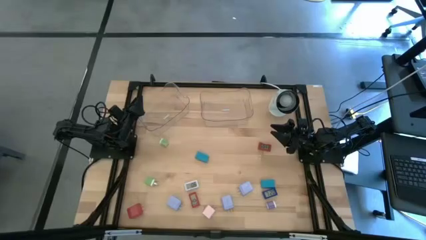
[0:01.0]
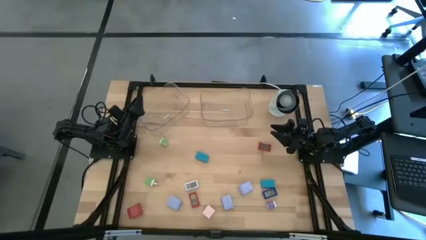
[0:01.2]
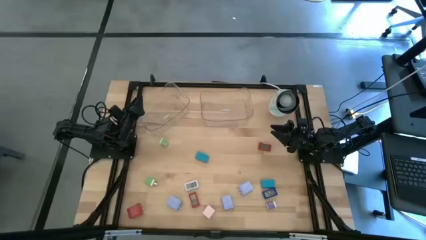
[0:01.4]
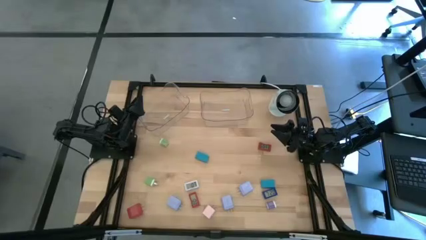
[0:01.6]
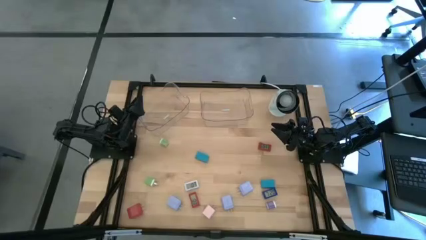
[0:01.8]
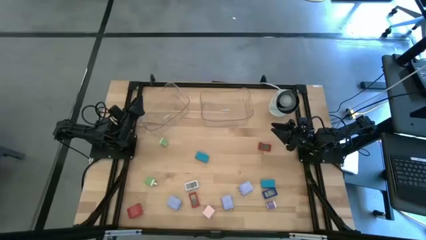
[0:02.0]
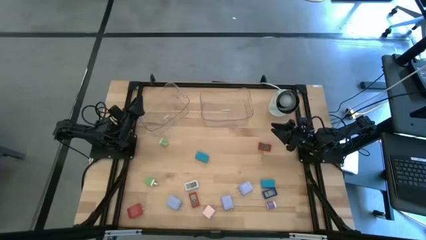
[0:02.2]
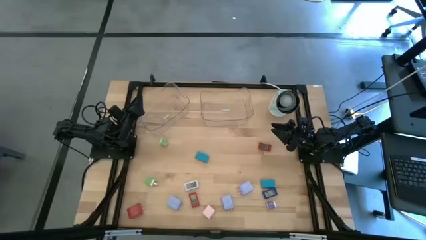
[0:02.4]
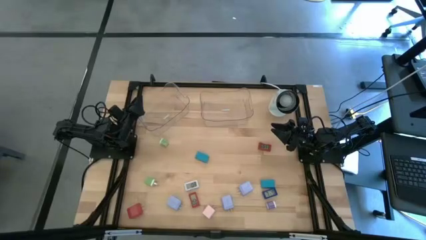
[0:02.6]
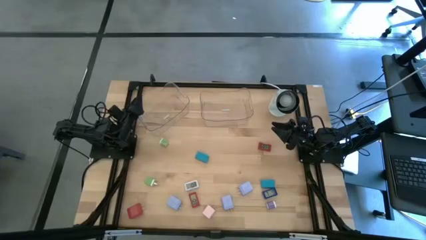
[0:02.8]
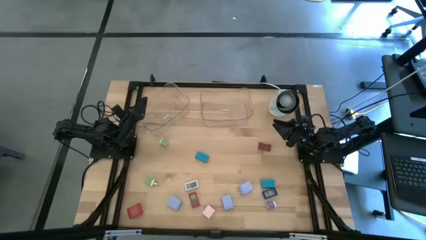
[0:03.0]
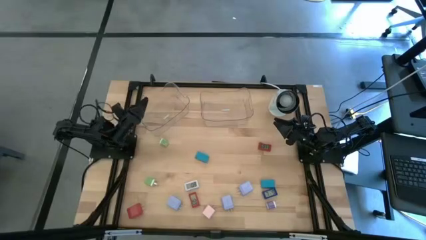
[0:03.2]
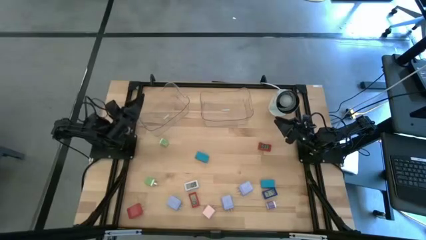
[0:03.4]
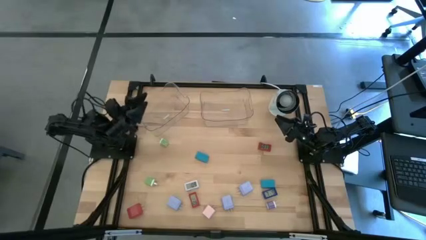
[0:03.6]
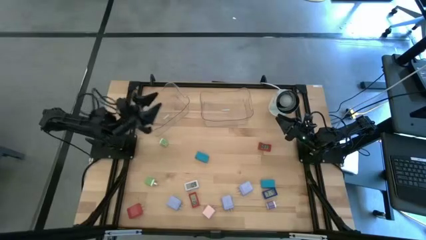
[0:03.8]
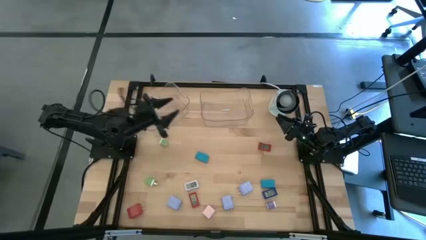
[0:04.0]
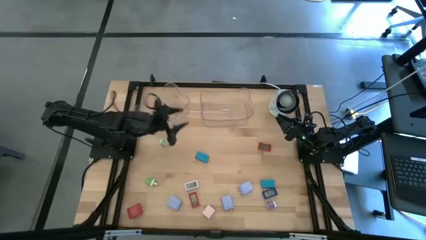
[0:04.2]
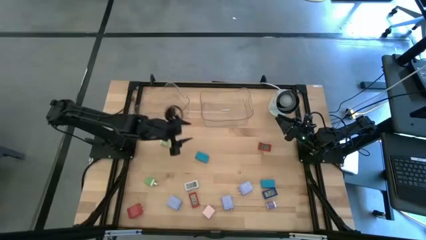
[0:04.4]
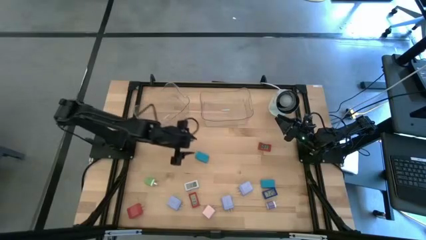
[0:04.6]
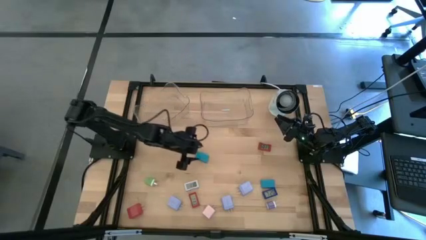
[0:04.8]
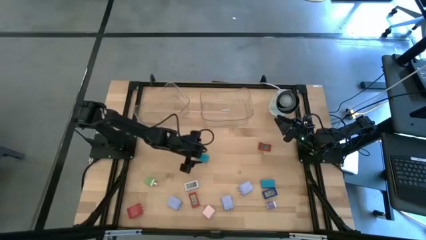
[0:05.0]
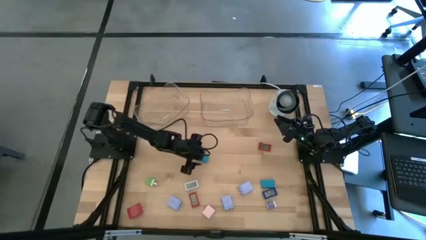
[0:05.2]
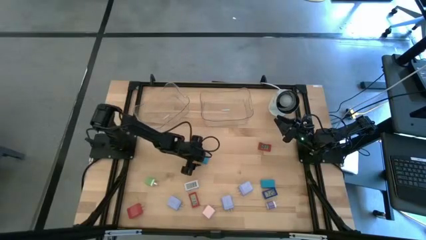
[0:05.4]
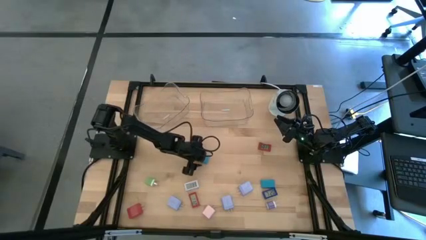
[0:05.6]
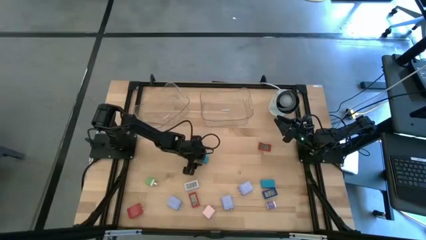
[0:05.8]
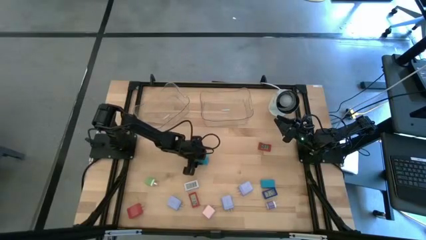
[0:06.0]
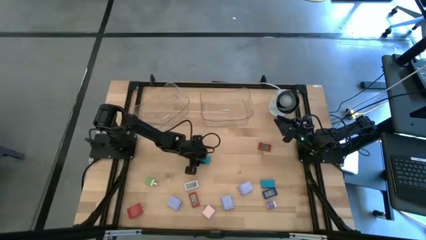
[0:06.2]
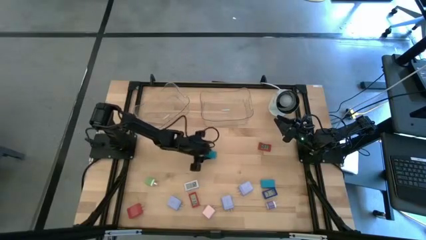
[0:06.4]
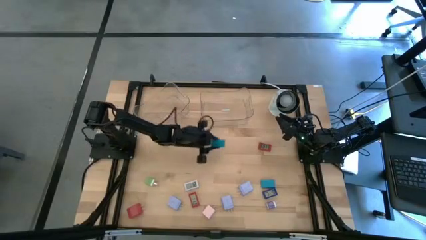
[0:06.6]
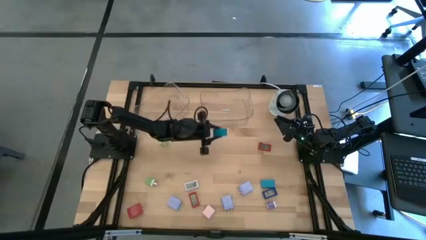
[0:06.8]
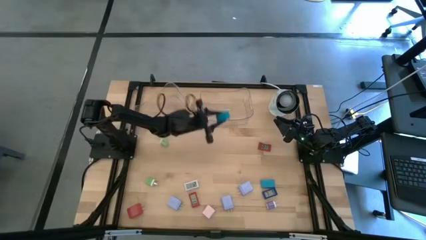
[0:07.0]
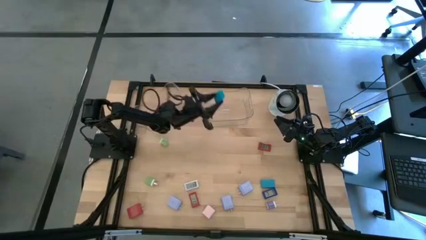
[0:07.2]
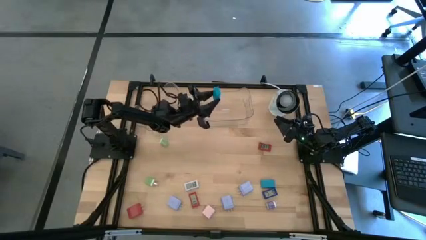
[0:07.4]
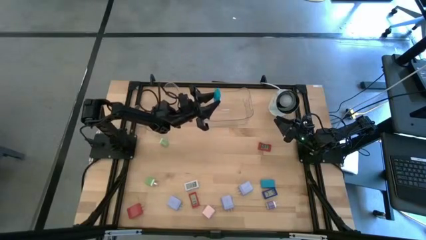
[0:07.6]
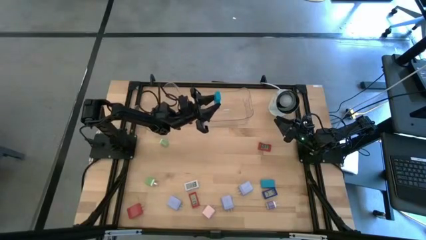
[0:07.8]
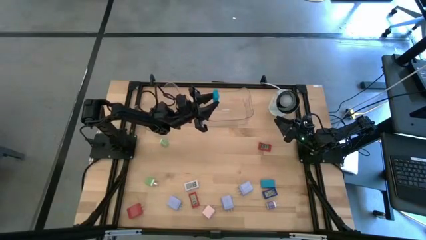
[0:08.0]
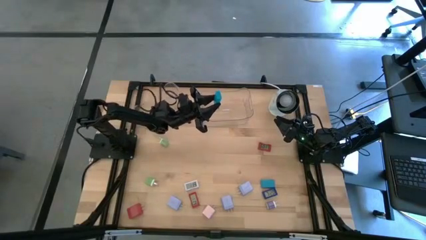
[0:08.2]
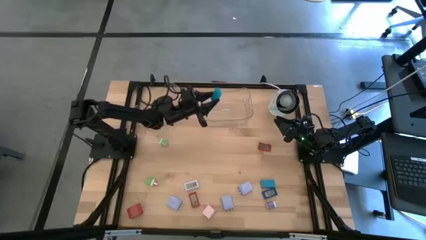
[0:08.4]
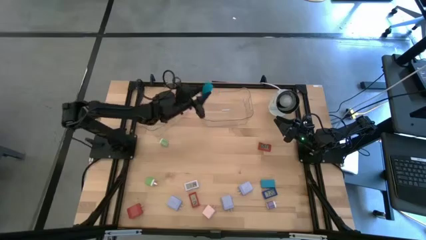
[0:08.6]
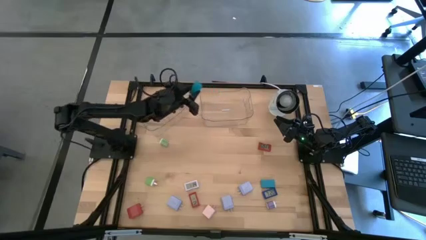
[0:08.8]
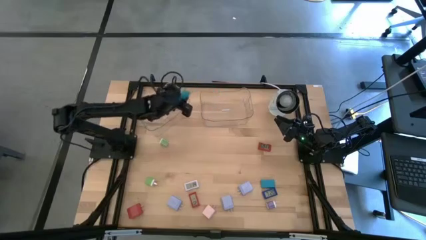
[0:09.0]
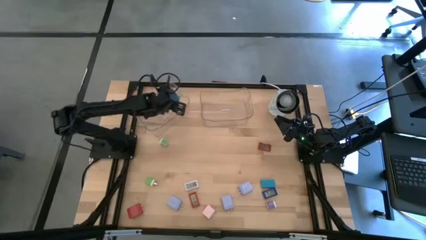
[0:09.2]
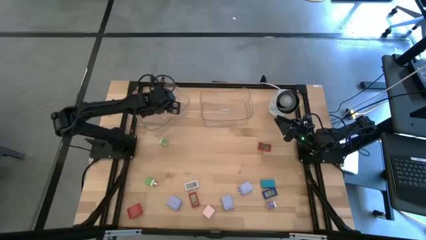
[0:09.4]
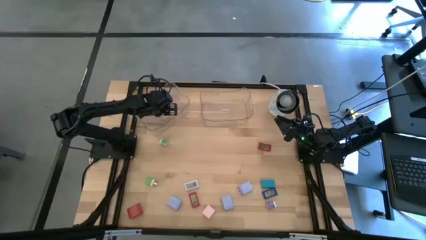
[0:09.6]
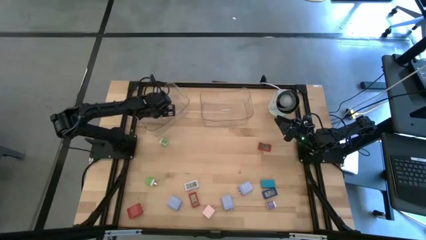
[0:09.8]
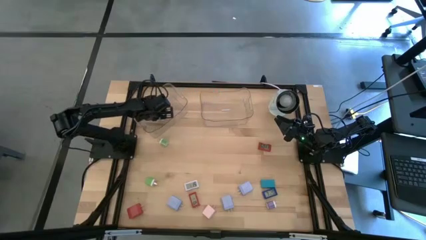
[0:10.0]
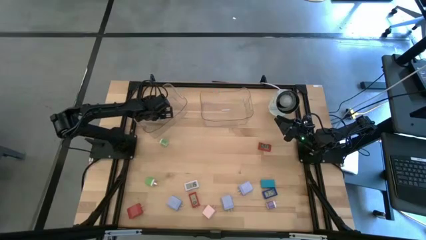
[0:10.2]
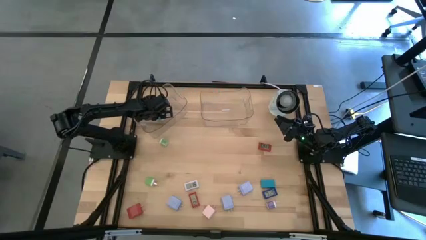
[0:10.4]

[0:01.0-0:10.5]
Task: Pick & Place Office items
Put the left blue digital timer into the left transparent bin

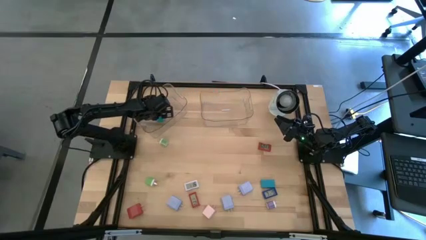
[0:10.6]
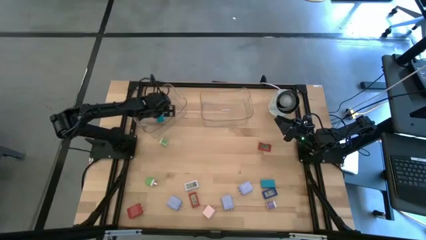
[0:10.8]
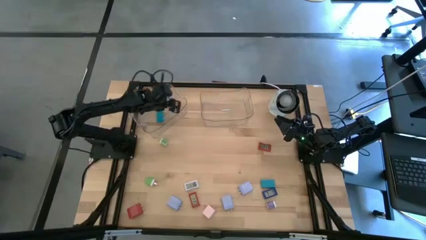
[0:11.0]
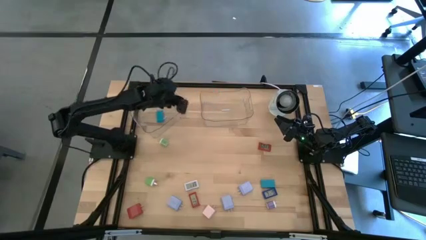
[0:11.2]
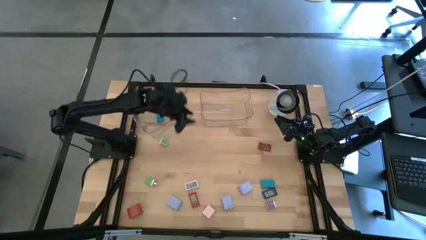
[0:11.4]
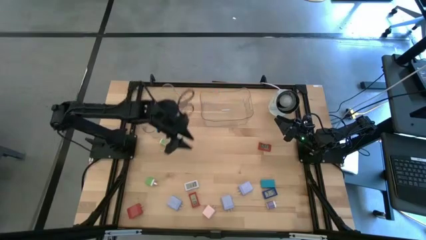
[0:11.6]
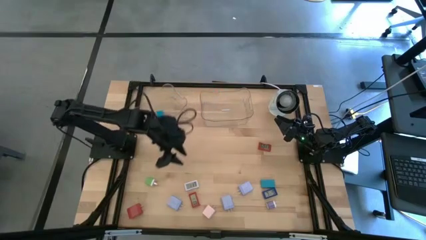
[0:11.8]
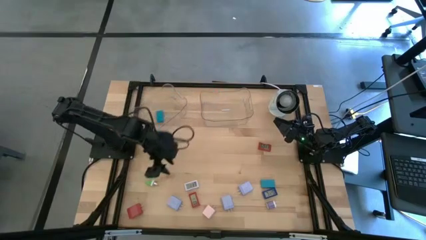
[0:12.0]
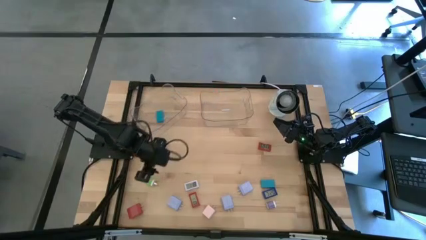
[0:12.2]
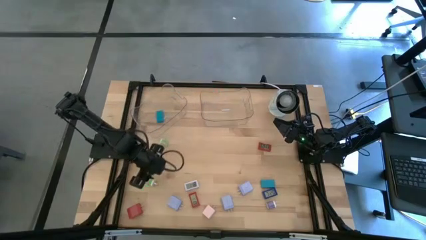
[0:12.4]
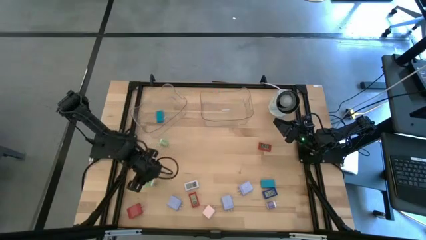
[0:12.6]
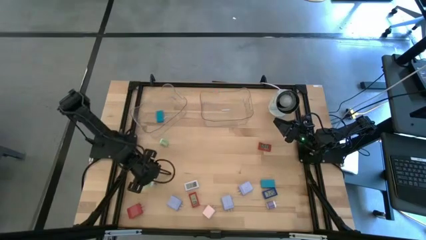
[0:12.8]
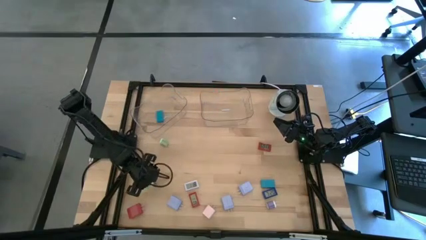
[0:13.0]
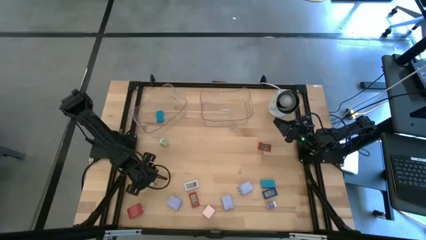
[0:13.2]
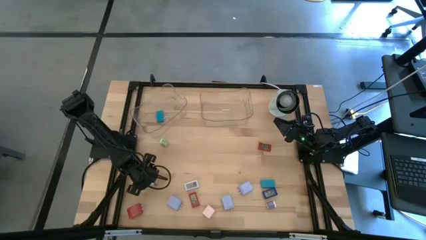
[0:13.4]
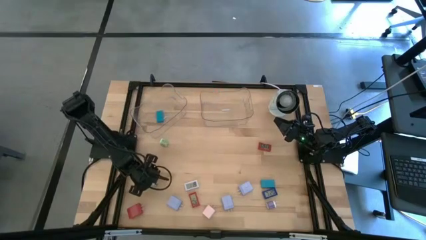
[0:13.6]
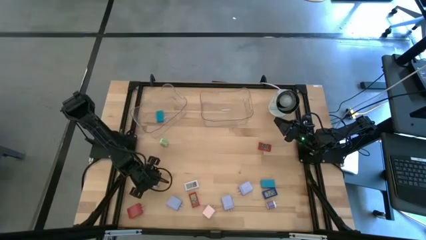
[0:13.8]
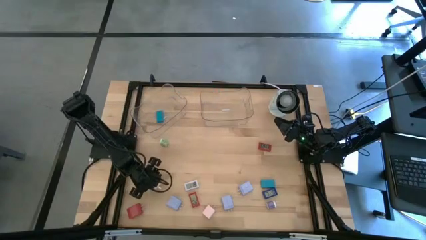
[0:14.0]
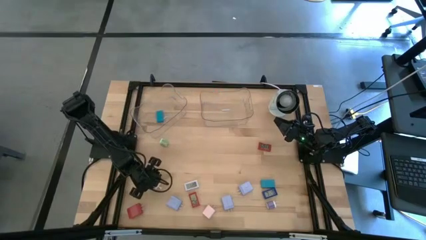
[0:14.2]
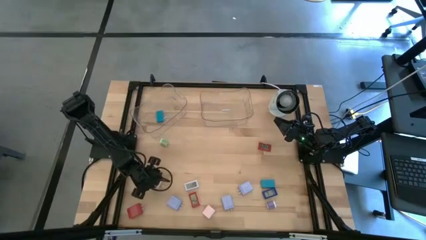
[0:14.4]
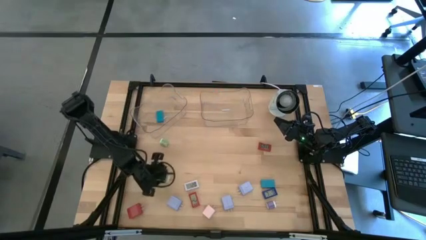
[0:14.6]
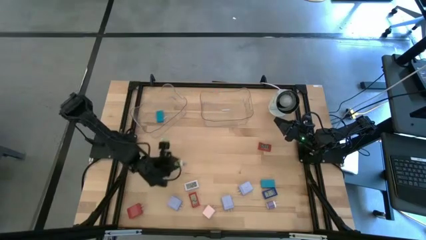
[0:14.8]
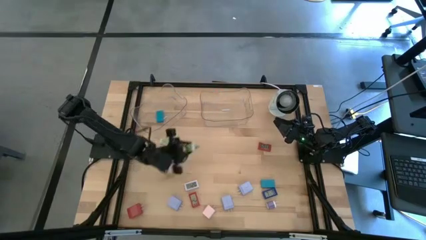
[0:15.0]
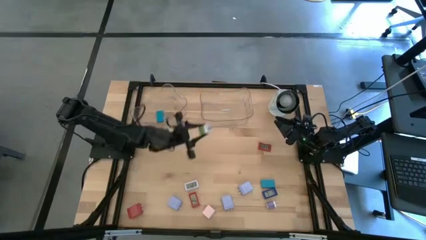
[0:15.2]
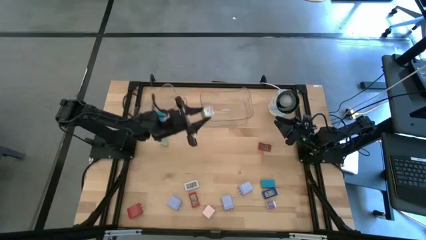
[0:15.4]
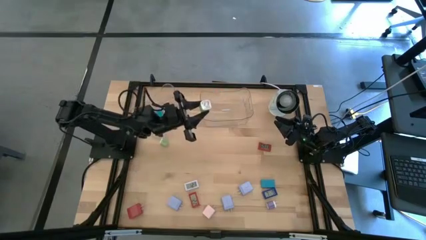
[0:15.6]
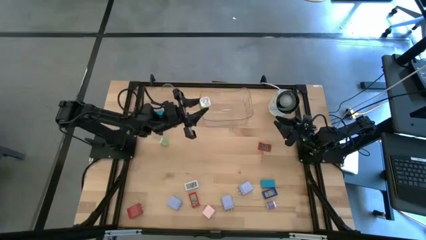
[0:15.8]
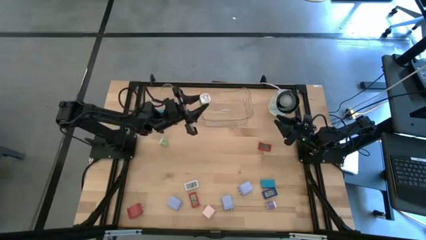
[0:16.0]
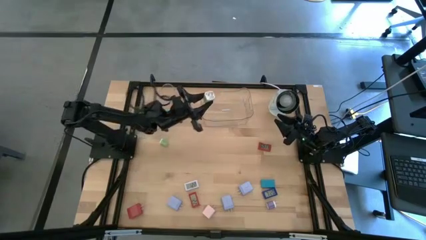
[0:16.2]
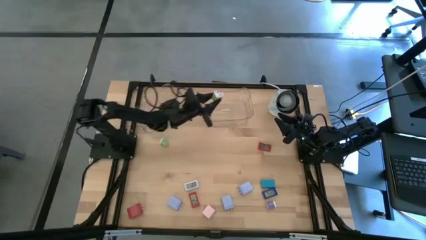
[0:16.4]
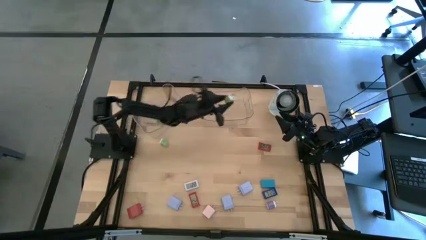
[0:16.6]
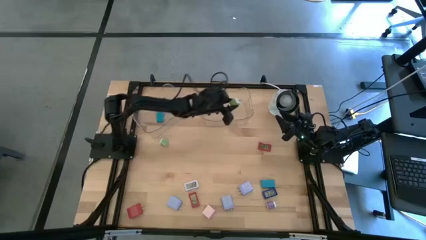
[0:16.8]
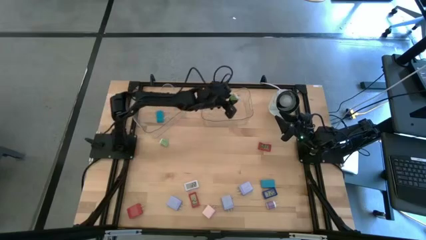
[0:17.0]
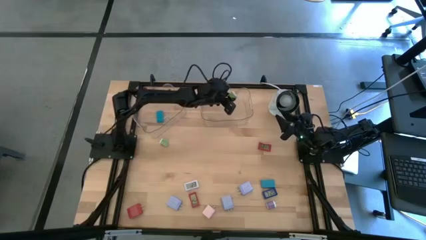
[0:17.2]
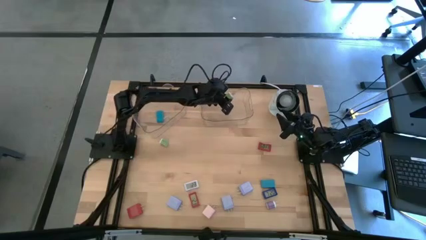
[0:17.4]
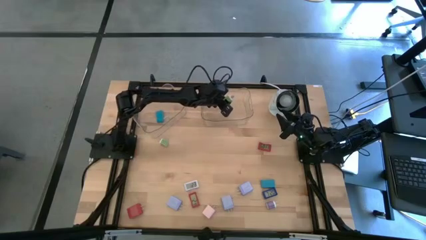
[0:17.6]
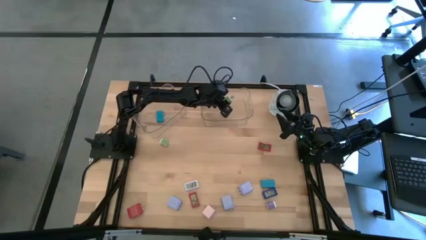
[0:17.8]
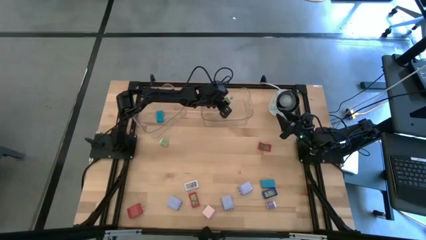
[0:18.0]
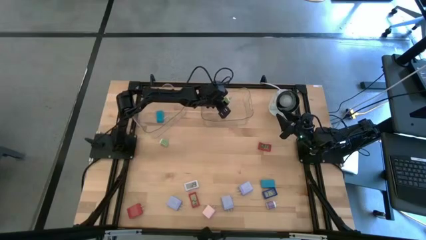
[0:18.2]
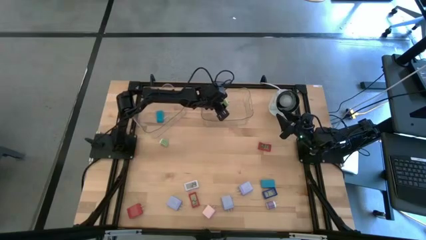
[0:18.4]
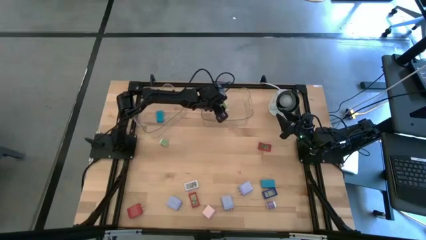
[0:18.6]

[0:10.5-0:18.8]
Put the bottom green charger adapter into the right transparent bin
